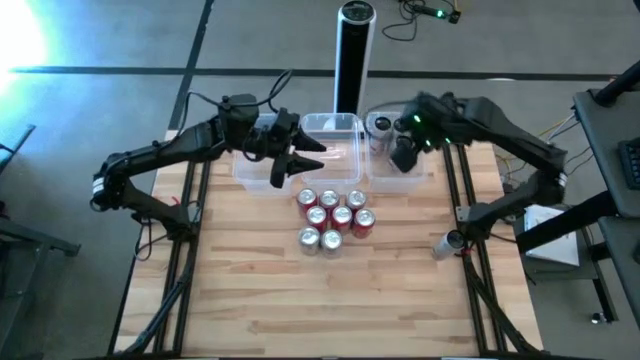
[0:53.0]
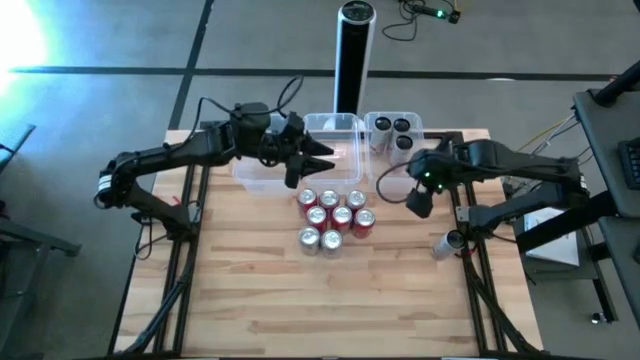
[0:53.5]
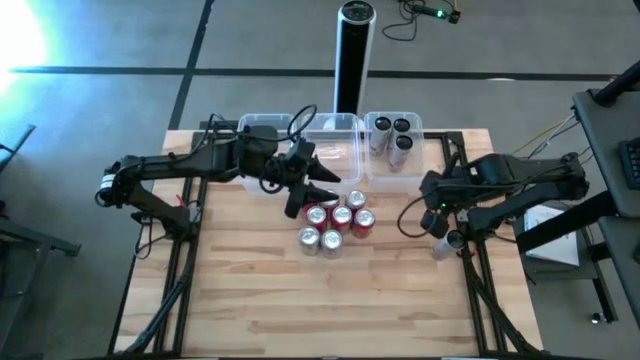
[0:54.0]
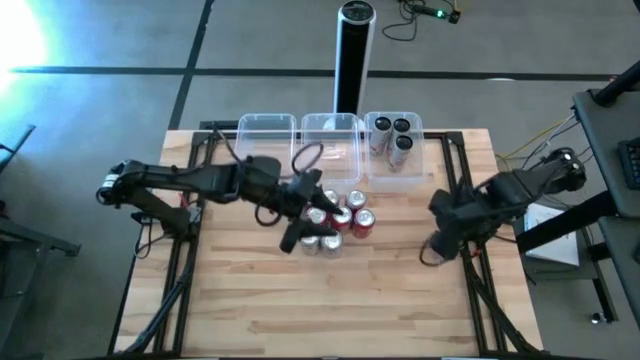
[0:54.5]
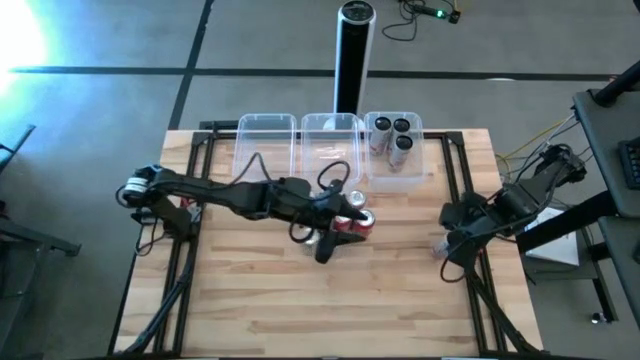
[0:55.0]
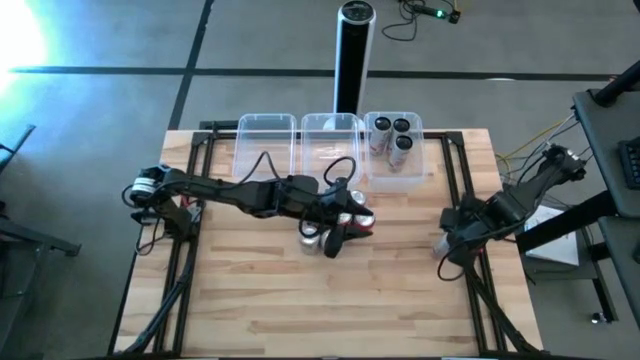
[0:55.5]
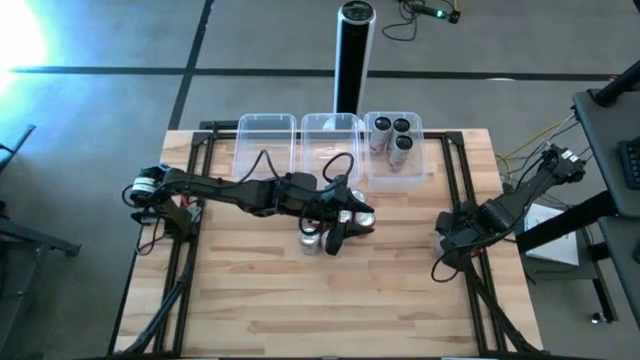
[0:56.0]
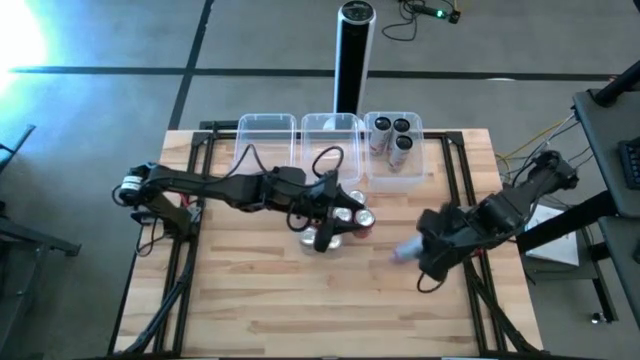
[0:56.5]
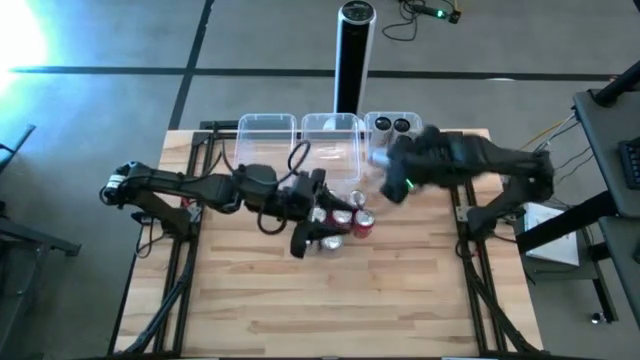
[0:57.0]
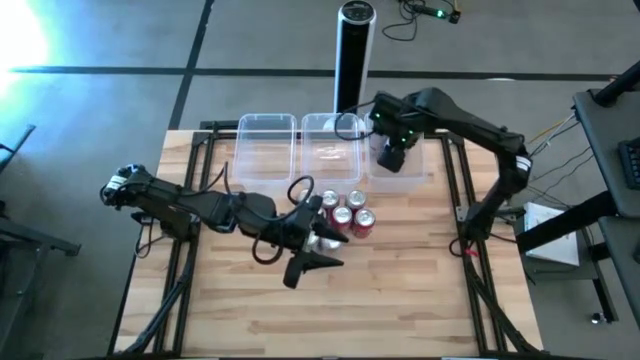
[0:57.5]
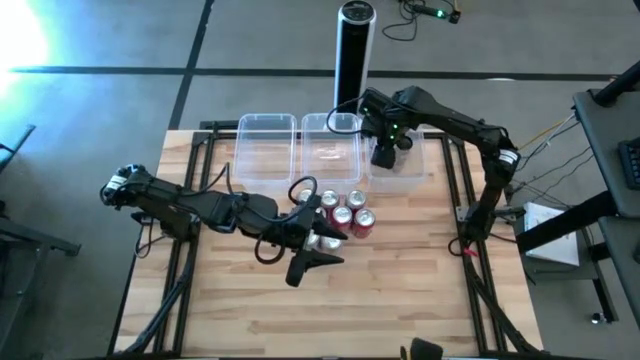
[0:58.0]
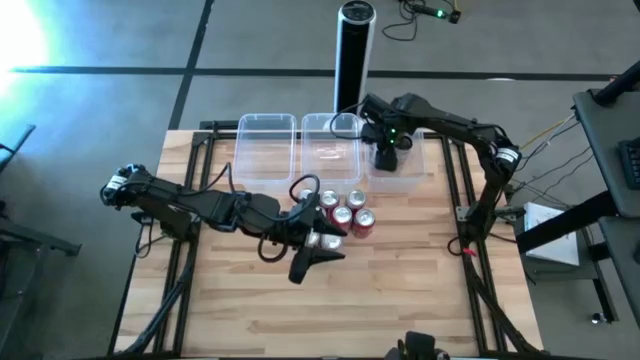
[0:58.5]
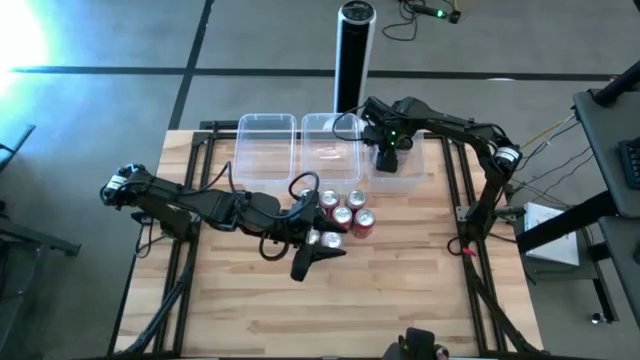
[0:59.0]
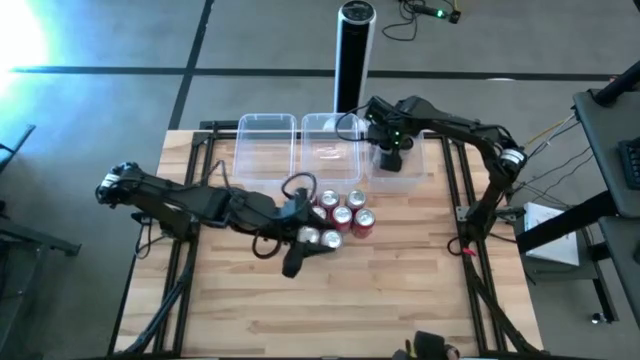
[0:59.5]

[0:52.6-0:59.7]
Task: Sort soda cans
Put the white-pink soda can into the right transparent bin

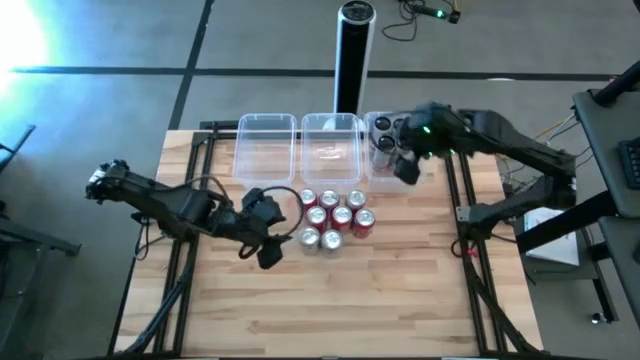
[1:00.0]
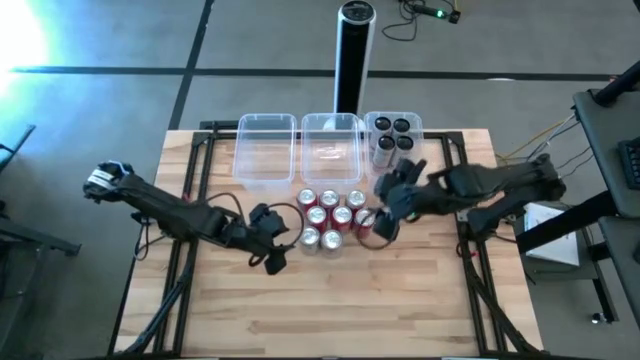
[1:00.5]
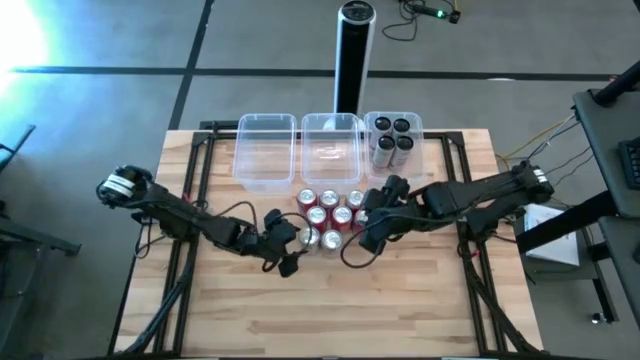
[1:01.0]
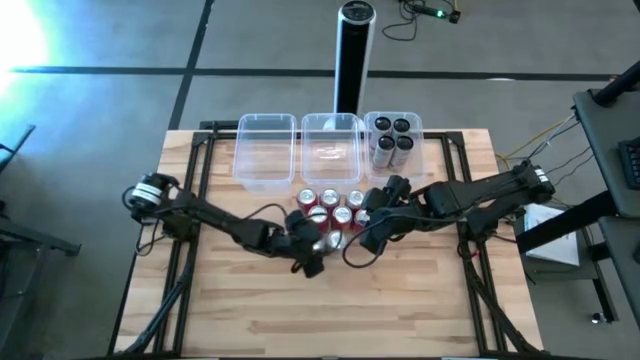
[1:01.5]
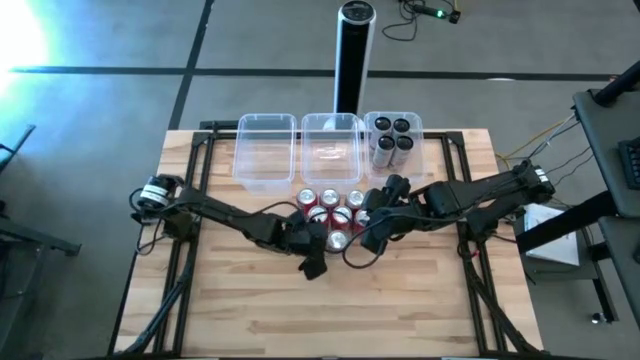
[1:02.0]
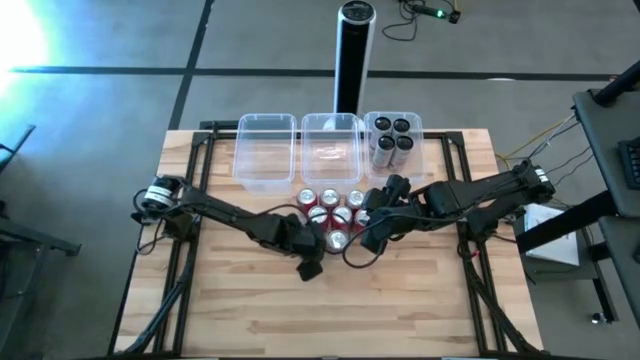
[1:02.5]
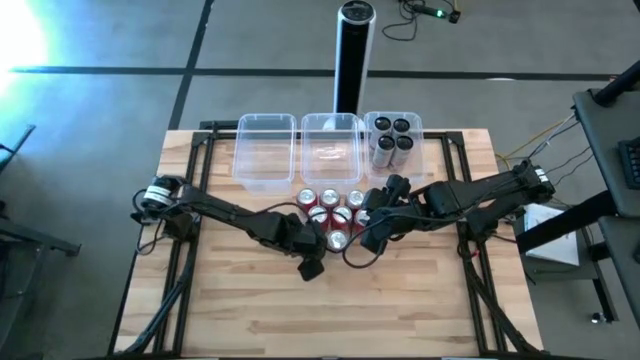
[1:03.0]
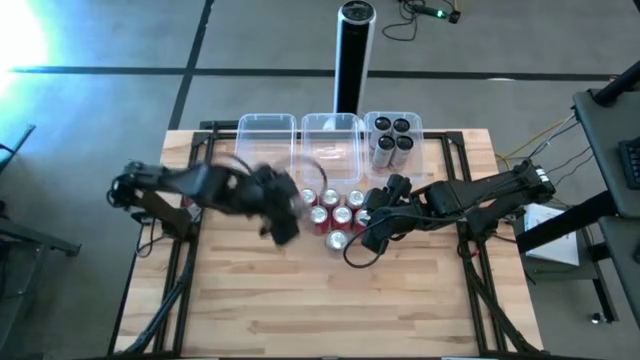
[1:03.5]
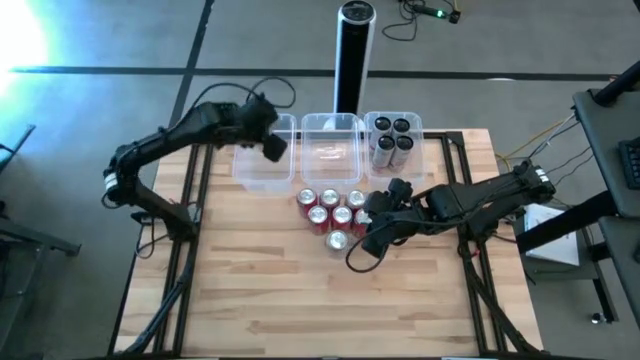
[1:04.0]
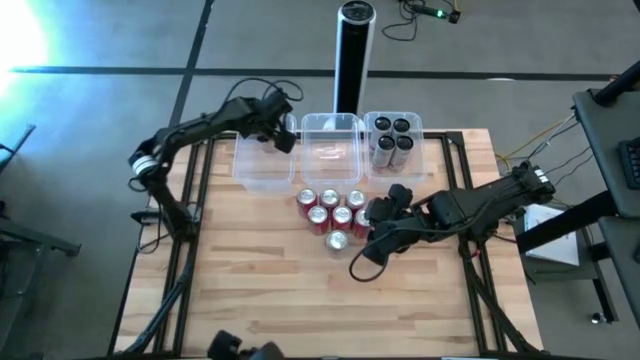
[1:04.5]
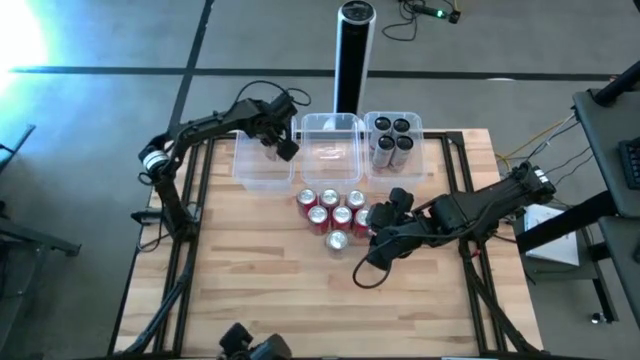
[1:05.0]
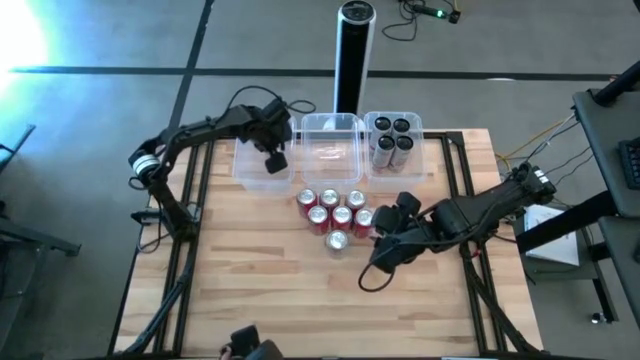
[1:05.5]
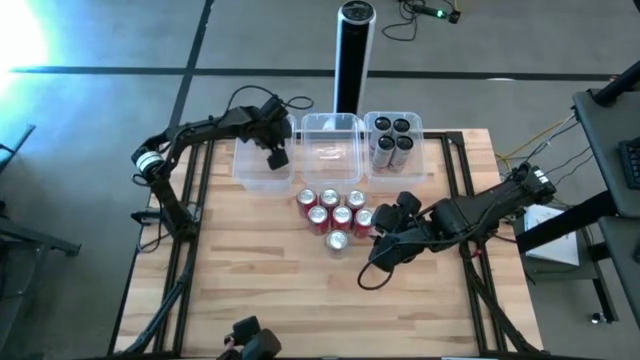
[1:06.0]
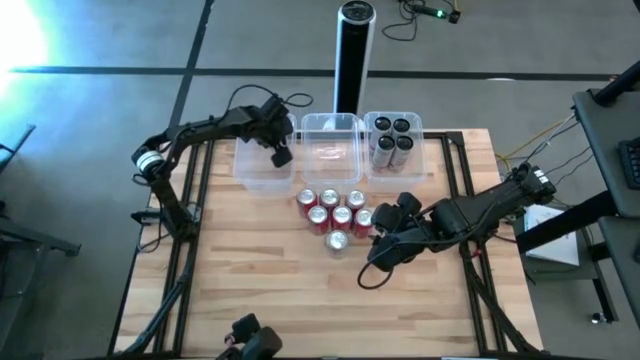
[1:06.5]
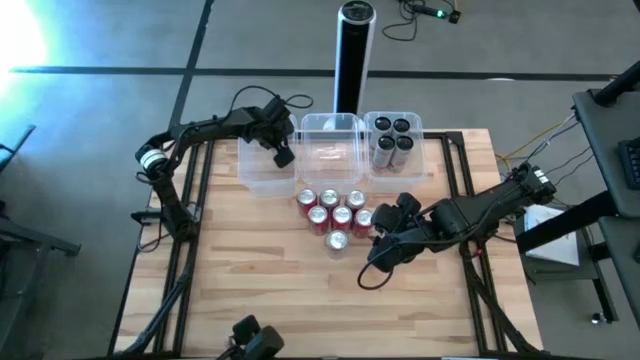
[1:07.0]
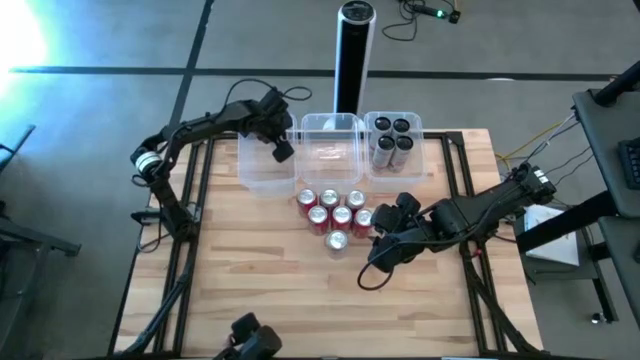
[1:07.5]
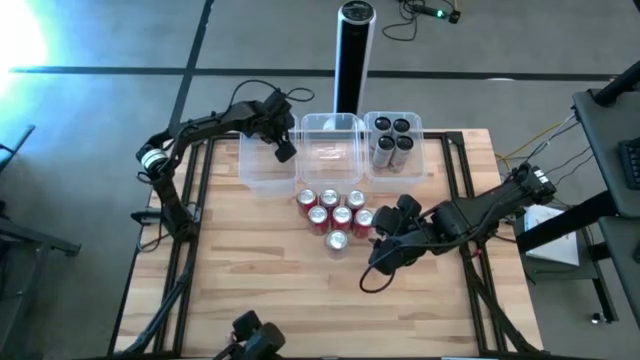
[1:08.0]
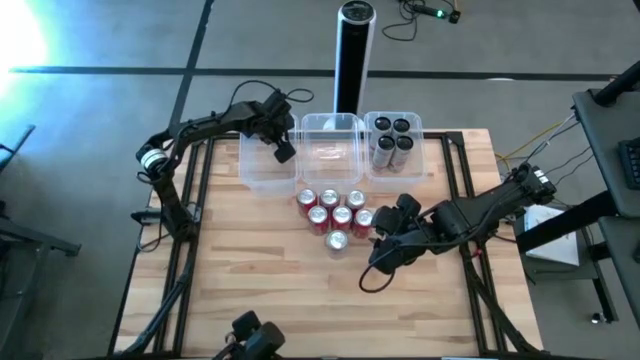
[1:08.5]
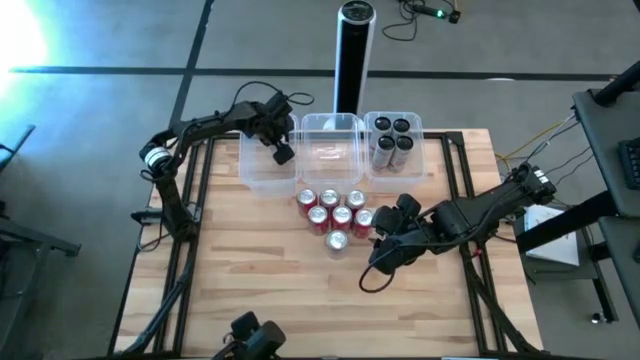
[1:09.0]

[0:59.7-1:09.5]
Put the bottom left white soda can into the left transparent bin

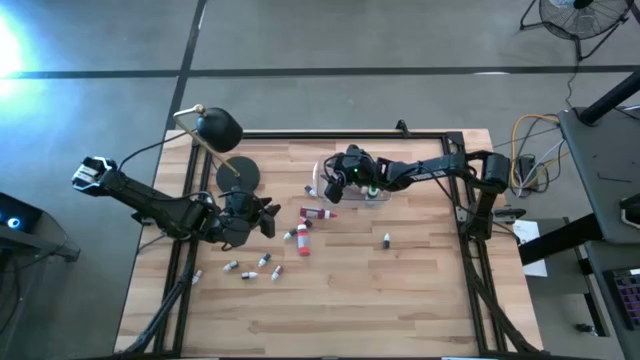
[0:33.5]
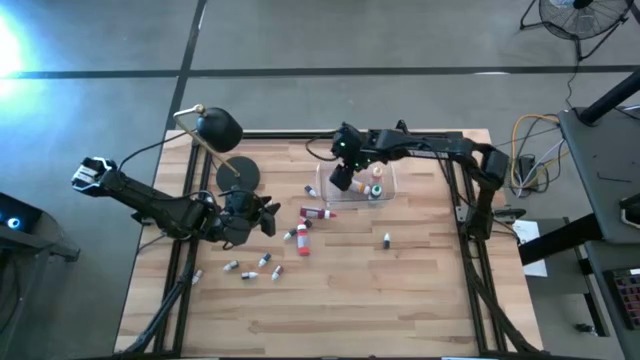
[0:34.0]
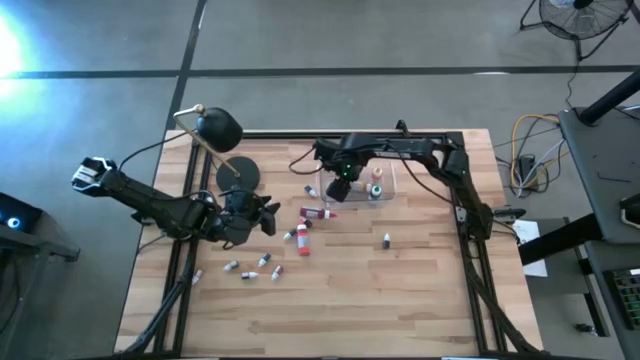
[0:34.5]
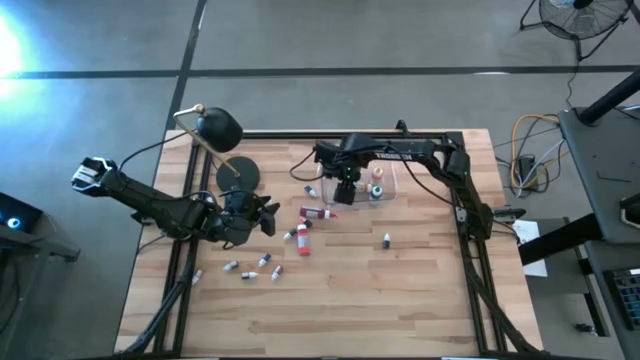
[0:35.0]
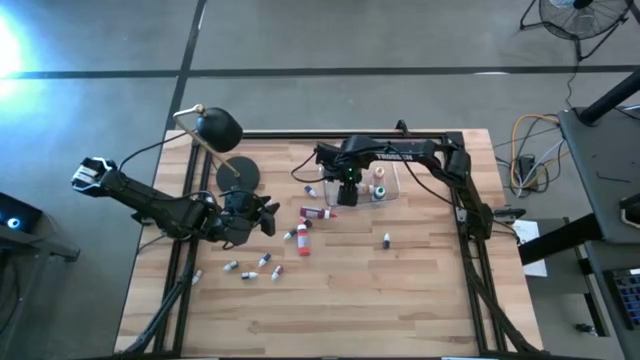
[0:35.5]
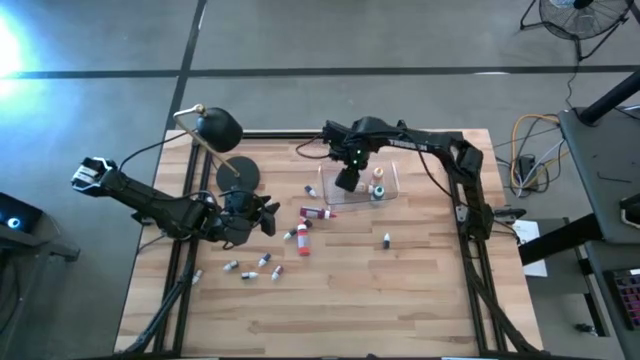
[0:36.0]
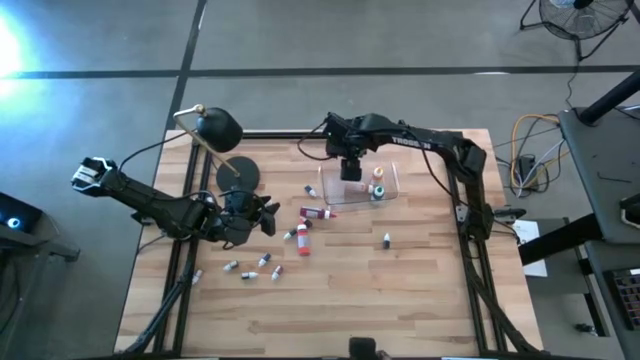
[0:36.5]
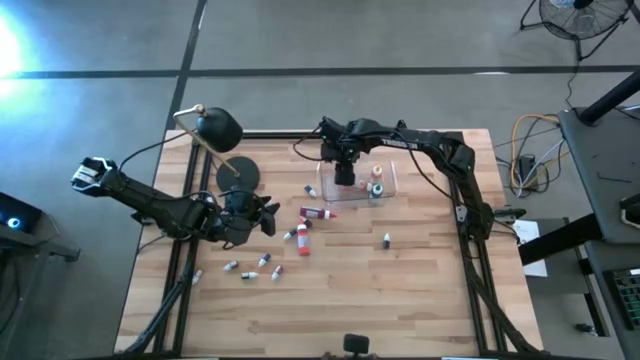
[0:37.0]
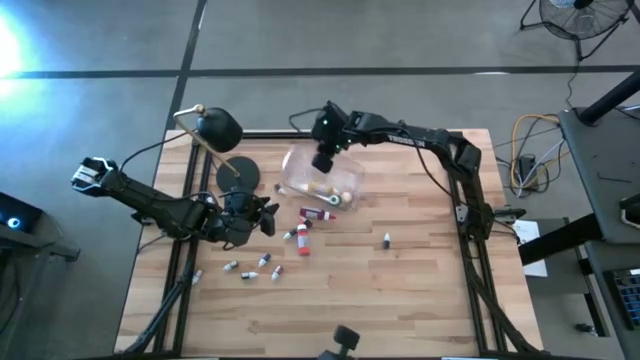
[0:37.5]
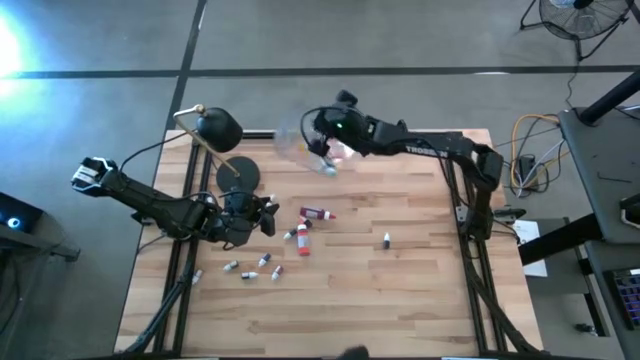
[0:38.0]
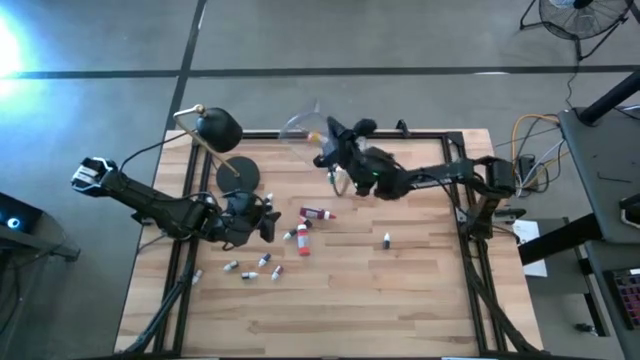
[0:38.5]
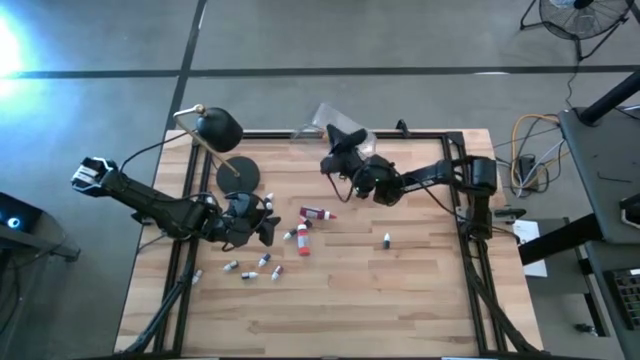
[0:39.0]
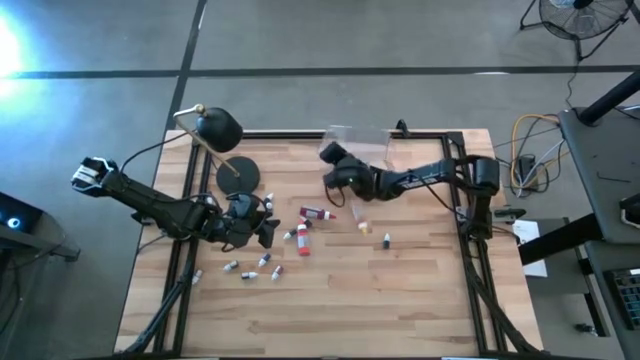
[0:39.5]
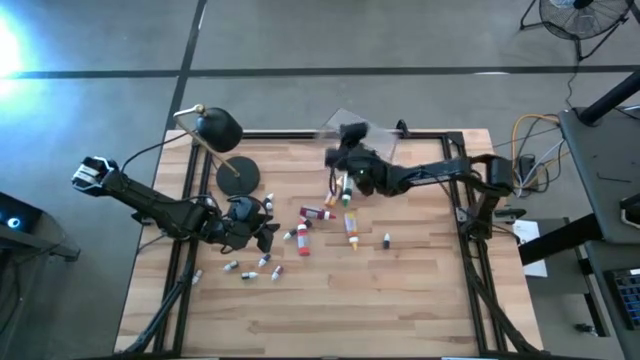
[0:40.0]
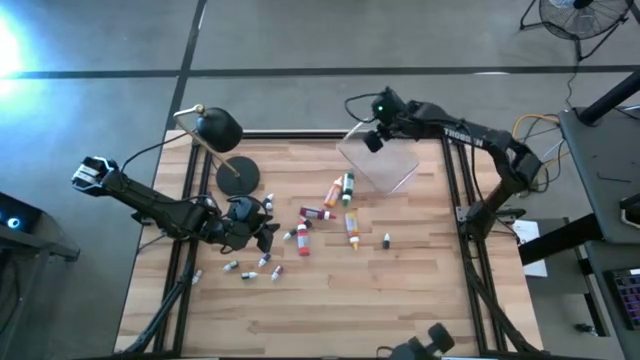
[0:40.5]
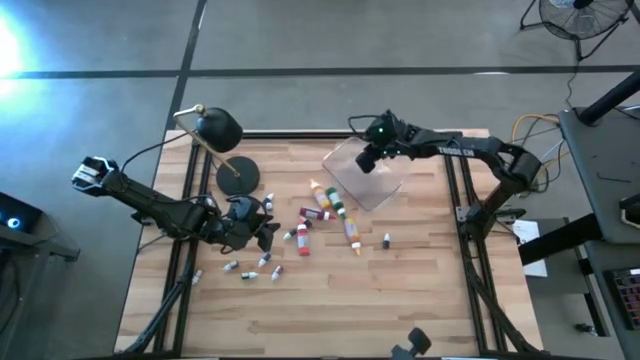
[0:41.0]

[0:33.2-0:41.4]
Task: Pick & Place food coloring
Remove the food coloring bottles from the transparent bin
